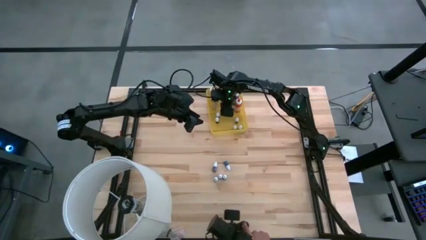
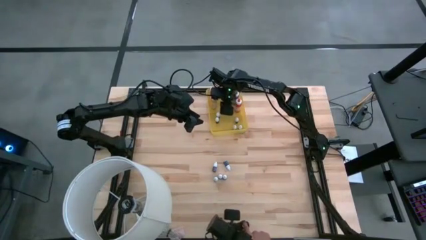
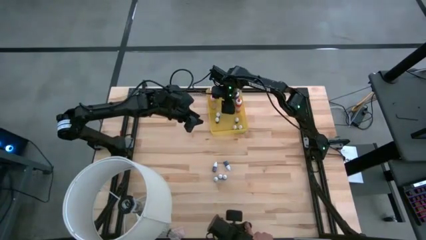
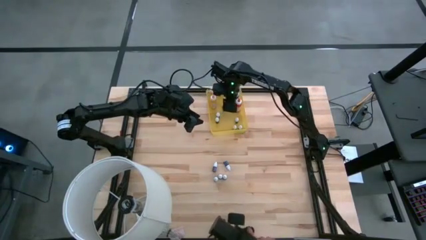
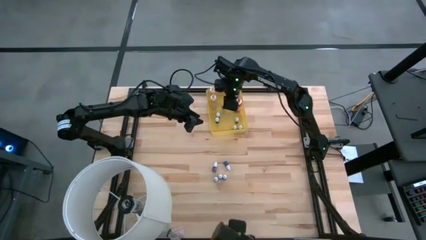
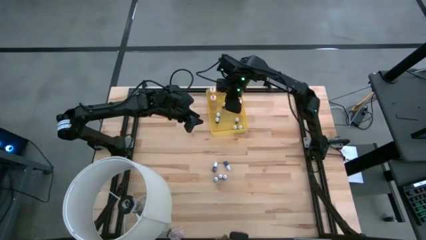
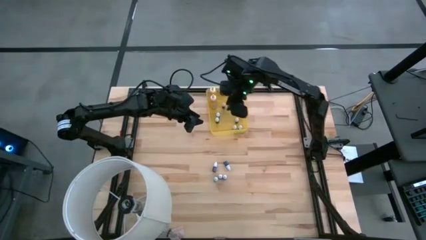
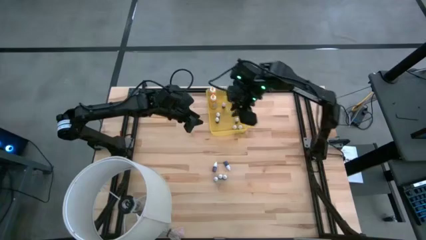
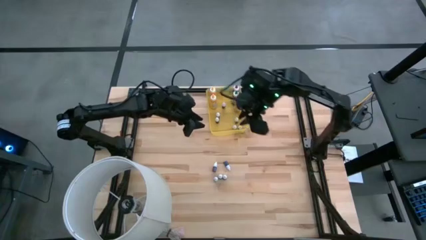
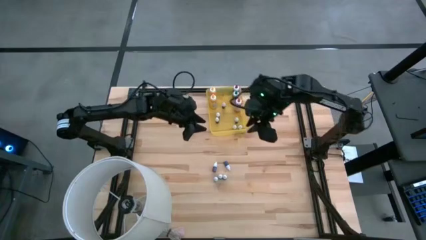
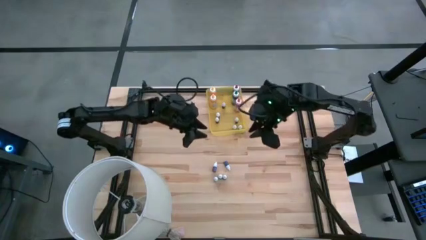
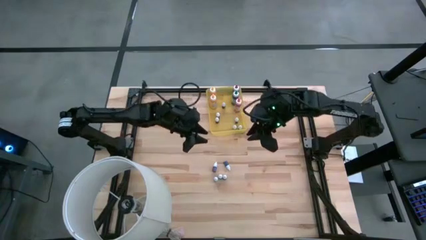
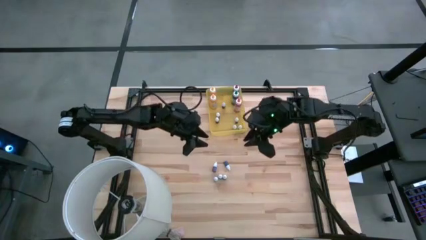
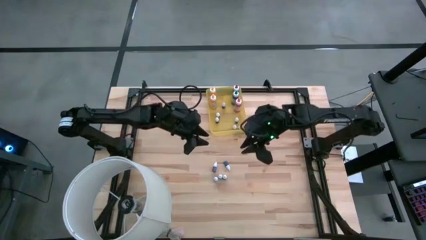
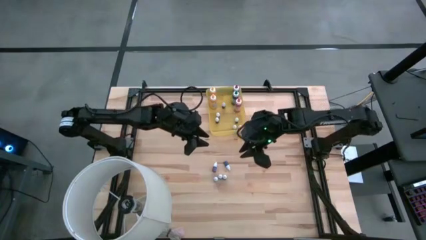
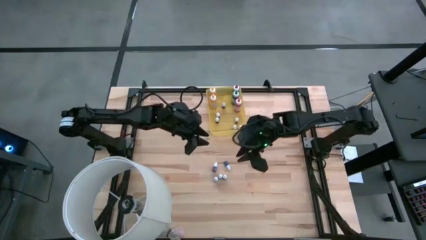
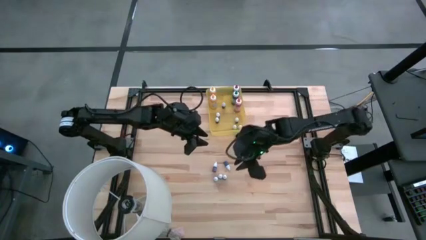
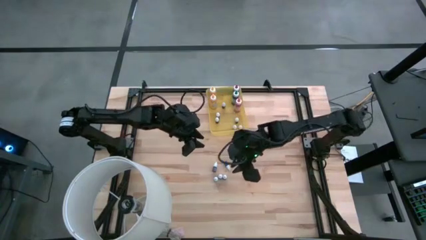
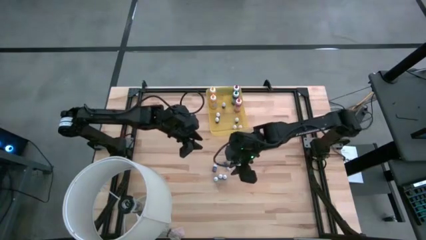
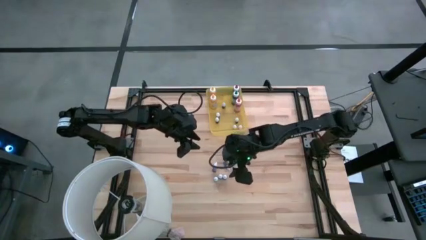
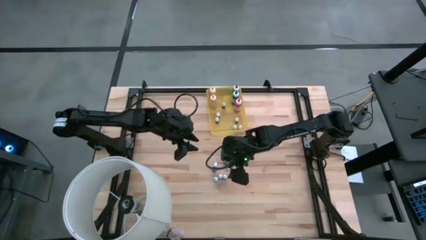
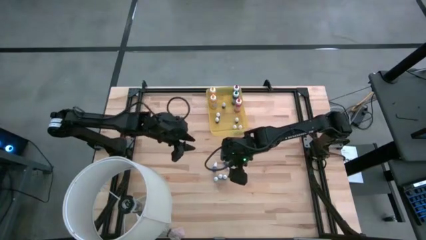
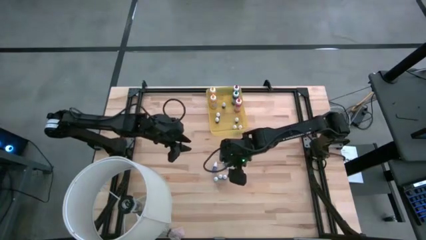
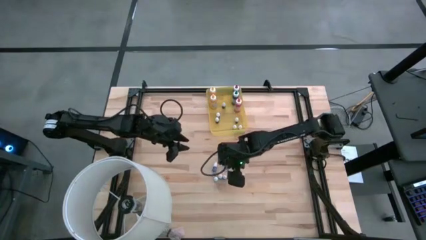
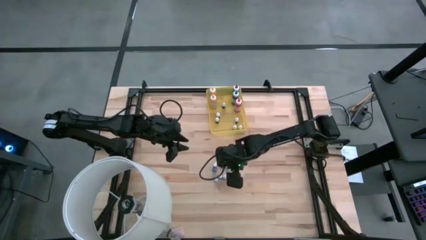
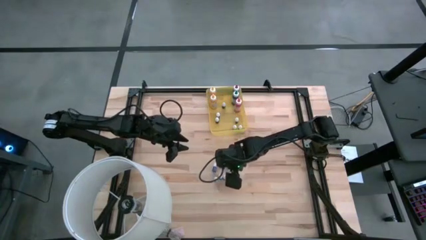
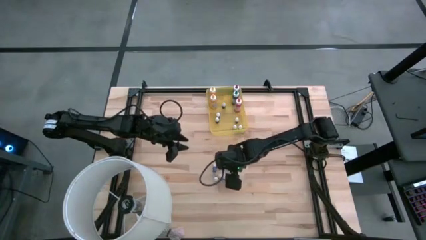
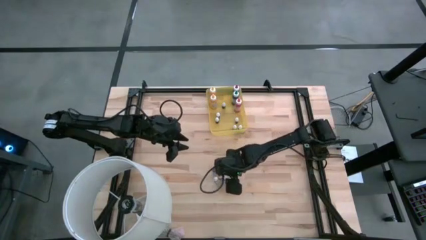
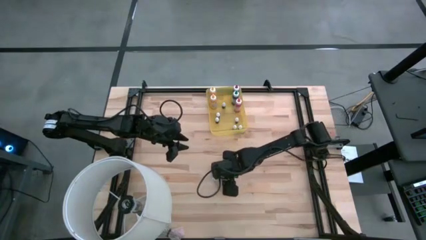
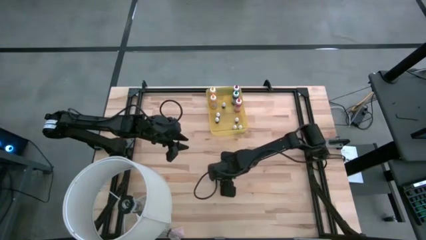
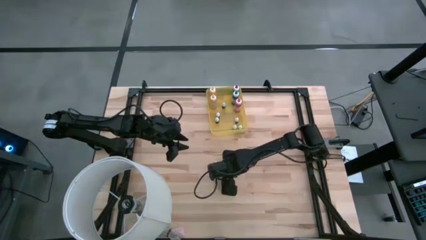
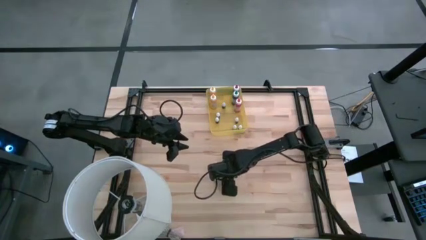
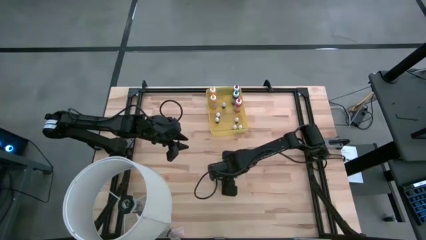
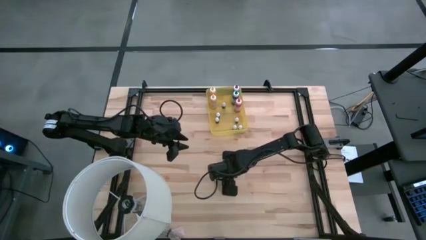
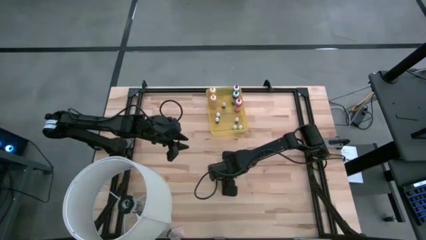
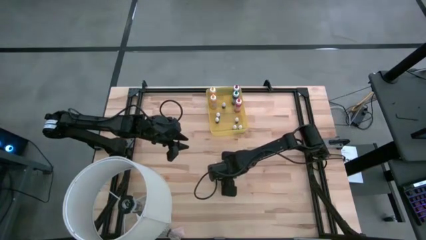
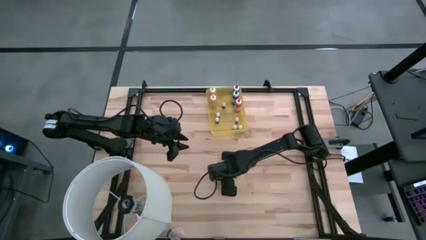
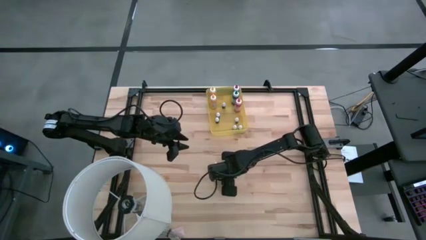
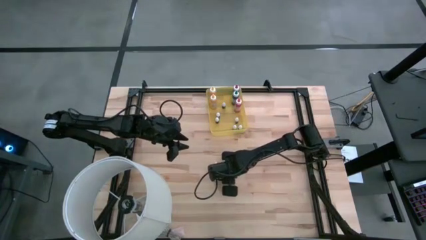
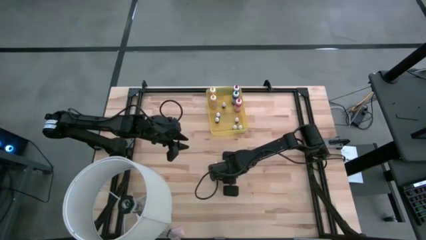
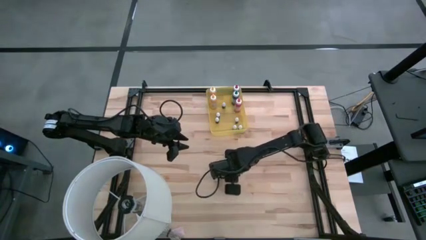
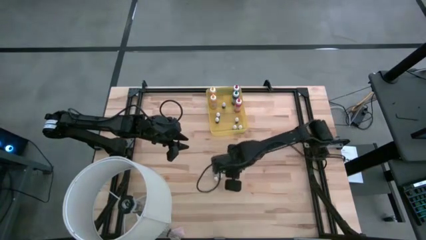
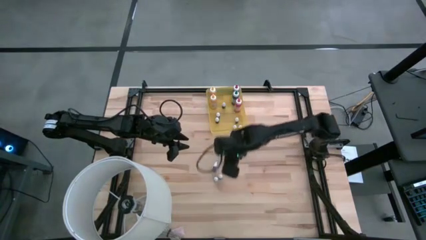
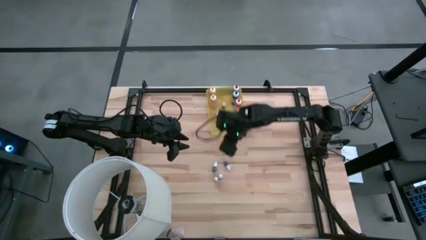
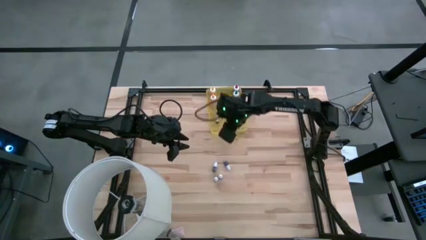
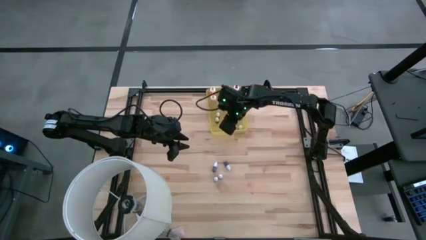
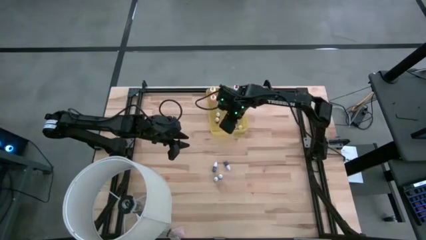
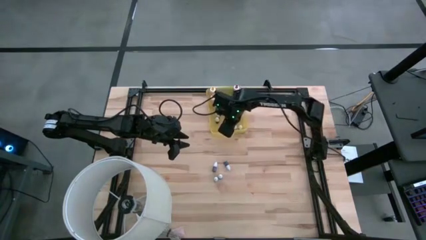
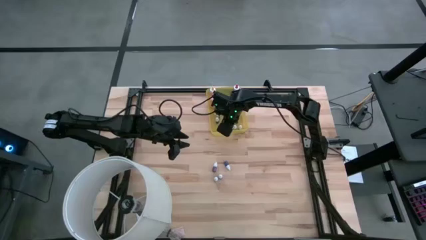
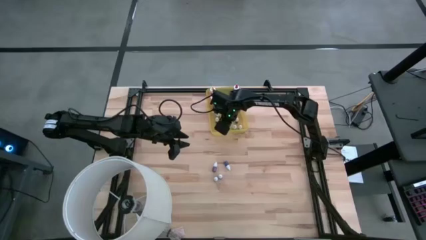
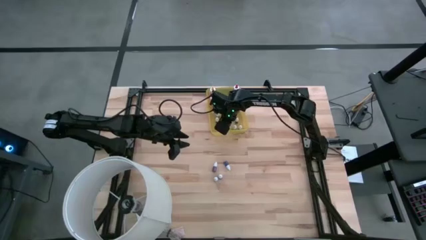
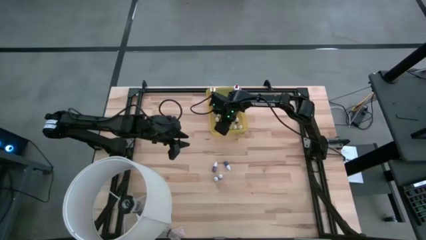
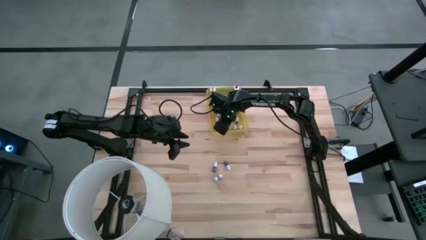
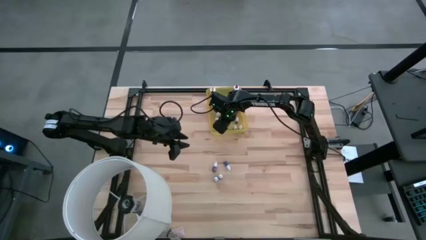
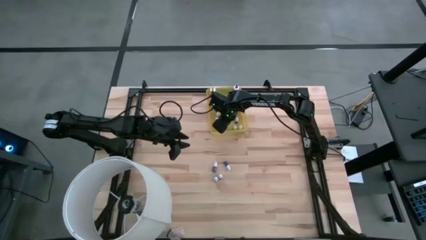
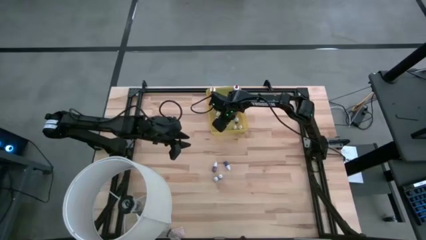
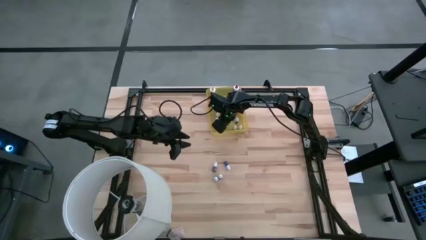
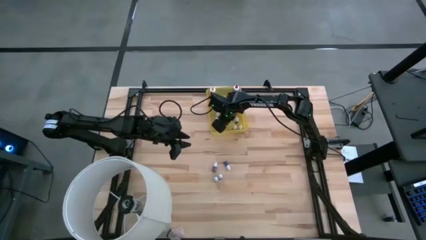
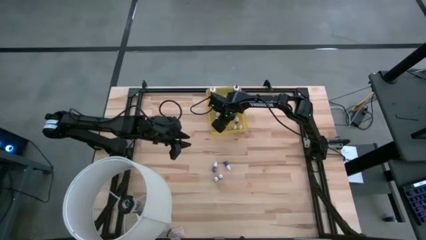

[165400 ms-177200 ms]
Task: Pick & Place food coloring
Put the right small dark green food coloring bottle into the yellow bin

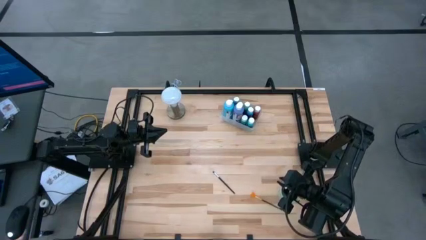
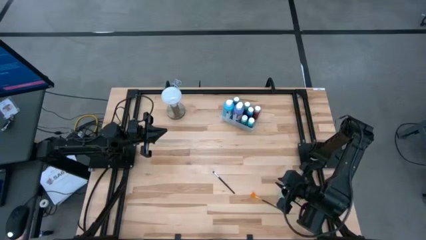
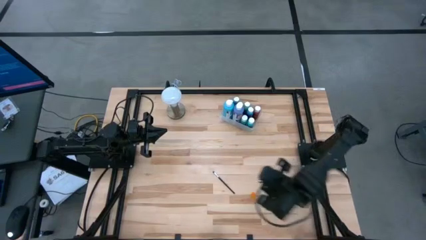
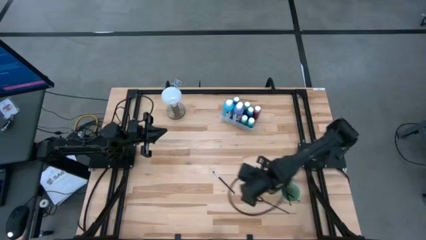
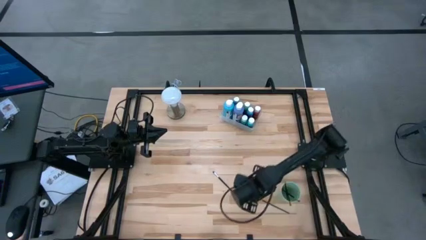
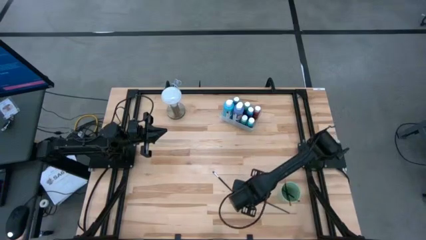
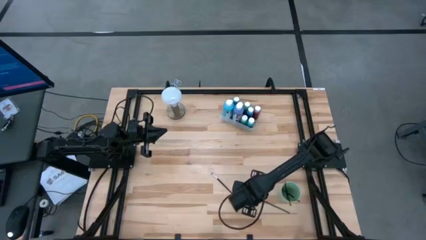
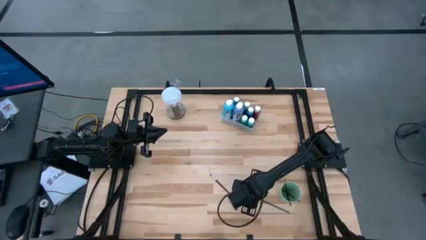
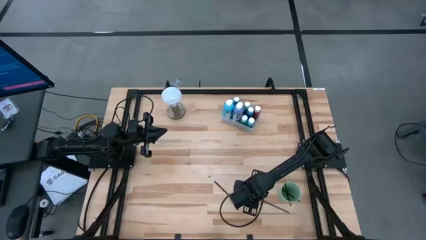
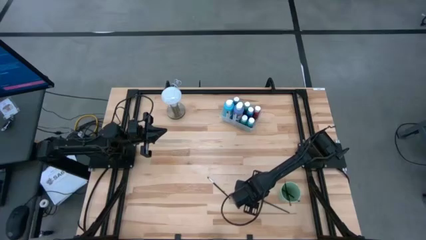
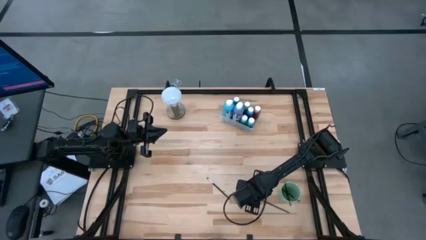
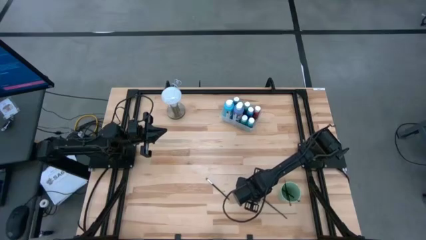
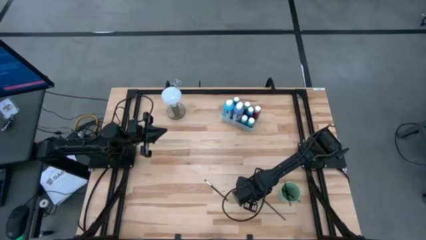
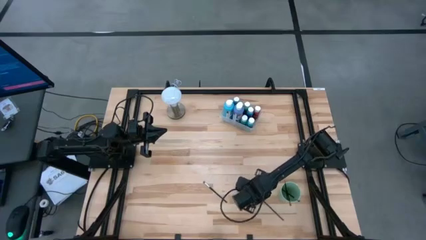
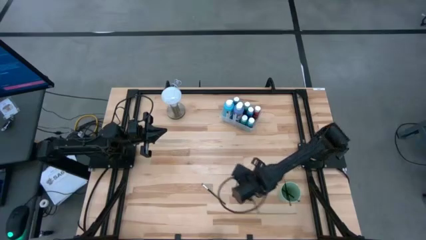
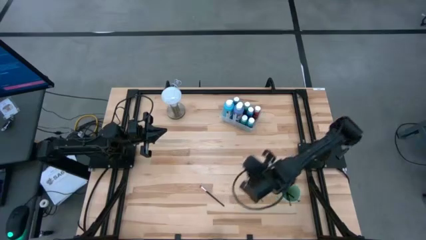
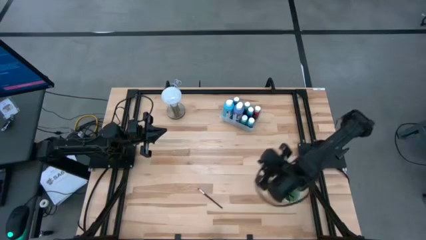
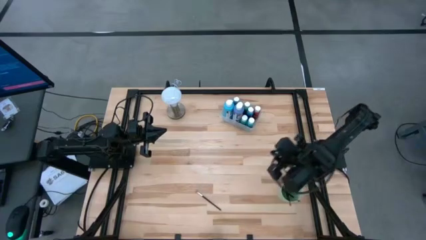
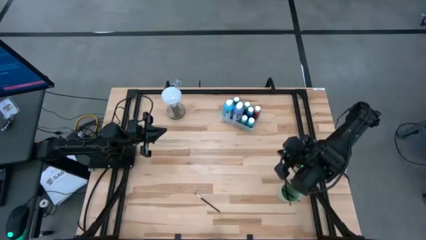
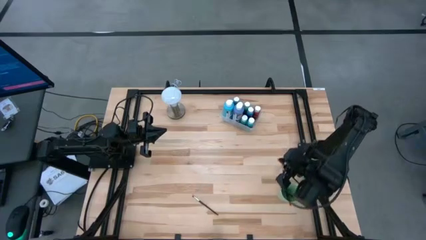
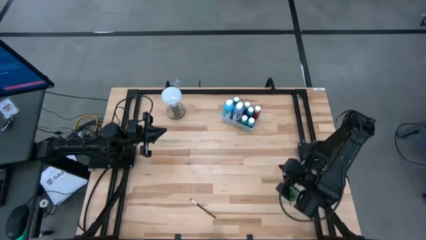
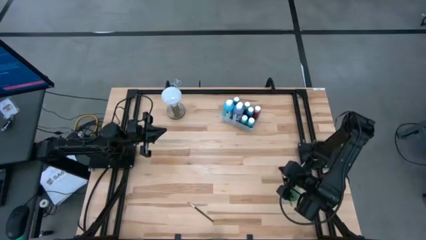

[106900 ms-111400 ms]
Task: Pick & Place Paint Supplies
Put the highlighter brush into the green cup
